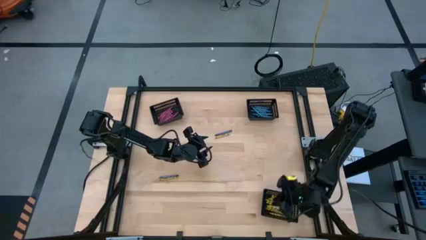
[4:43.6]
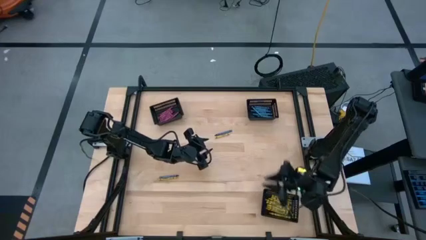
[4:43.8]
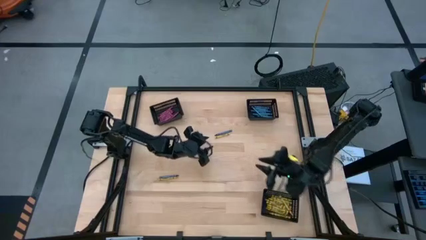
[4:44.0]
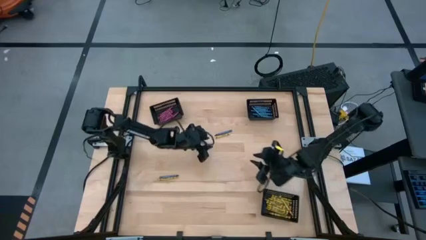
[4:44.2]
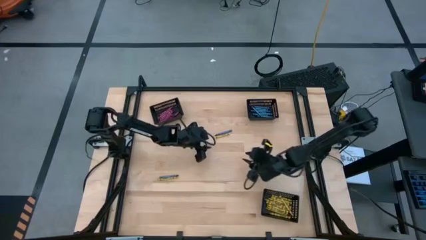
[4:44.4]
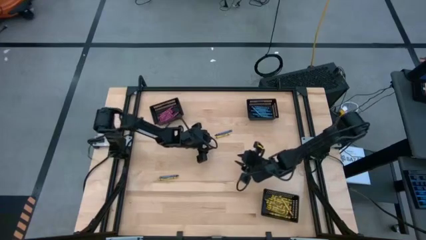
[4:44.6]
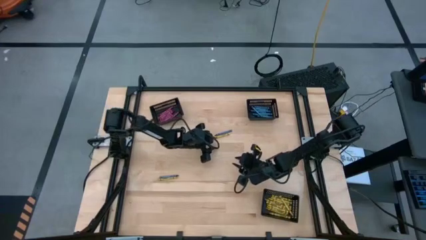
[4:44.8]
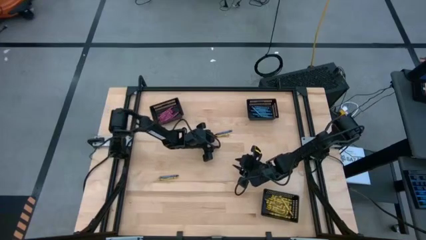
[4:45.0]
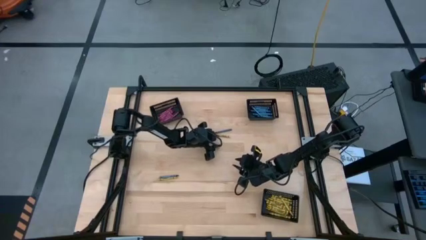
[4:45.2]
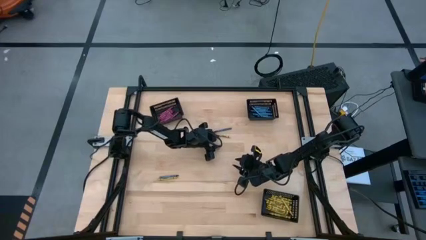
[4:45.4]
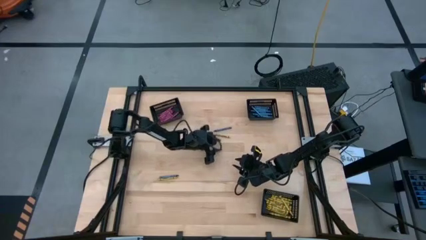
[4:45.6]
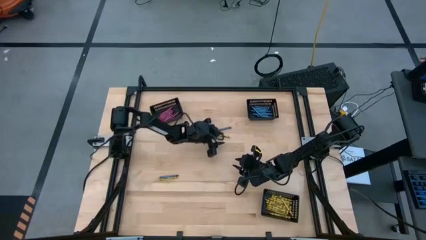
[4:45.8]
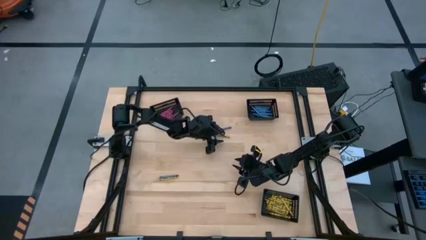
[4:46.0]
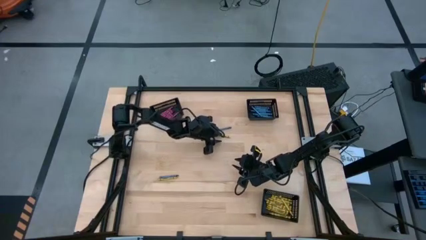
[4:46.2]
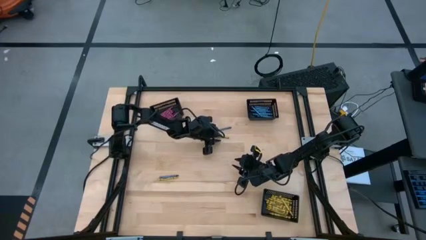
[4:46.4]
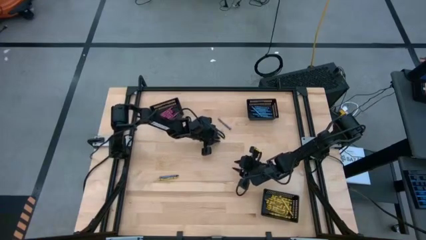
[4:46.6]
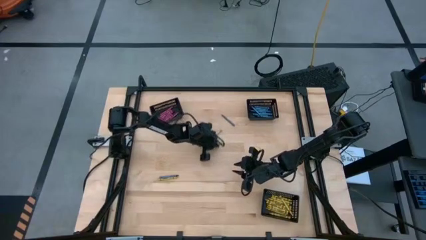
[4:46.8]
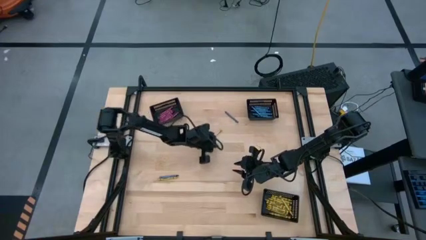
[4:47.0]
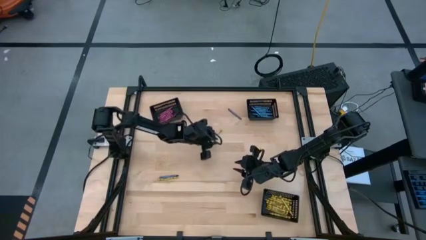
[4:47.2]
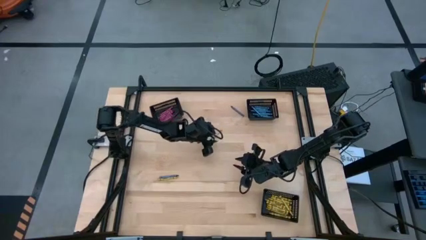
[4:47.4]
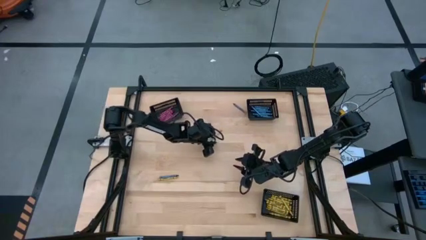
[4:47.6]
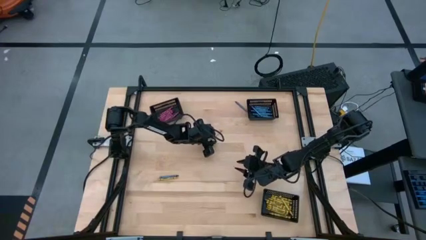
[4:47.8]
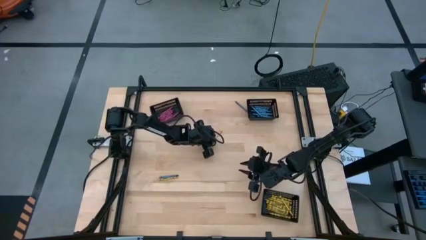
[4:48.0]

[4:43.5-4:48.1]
Task: Sort crayons
Put the yellow crayon into the bottom black bin

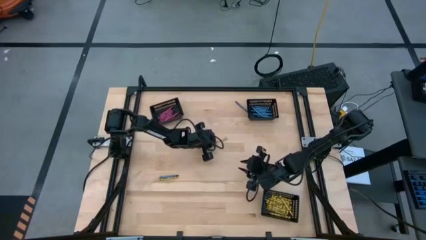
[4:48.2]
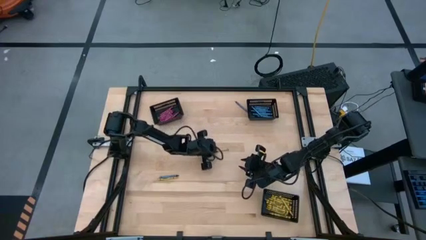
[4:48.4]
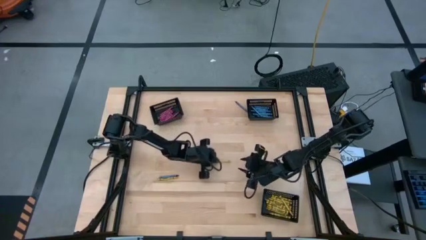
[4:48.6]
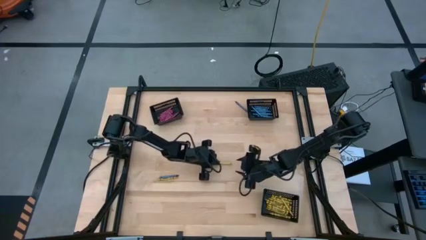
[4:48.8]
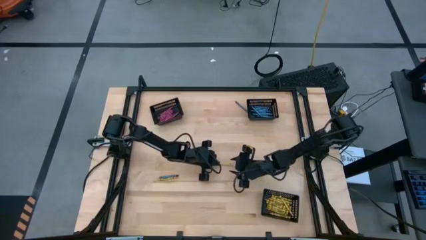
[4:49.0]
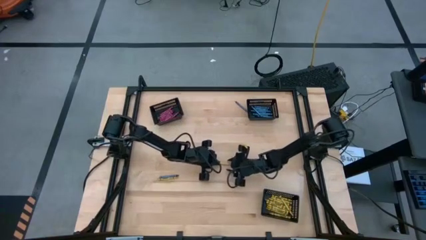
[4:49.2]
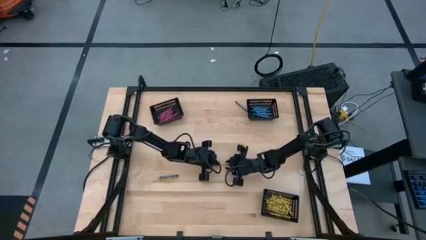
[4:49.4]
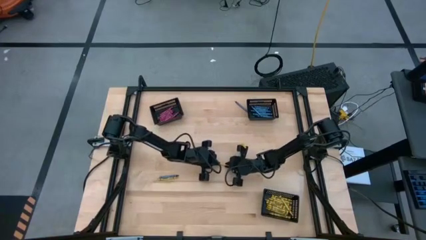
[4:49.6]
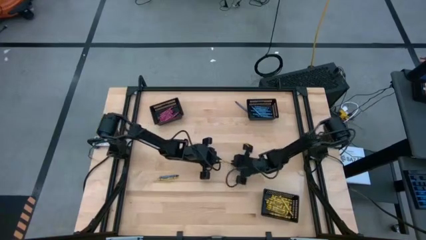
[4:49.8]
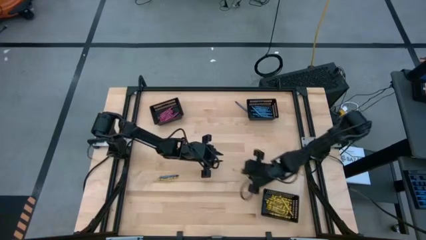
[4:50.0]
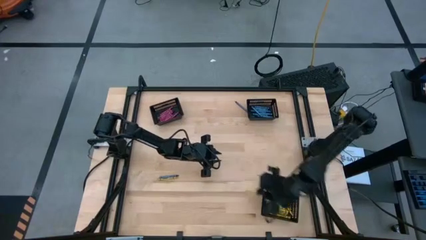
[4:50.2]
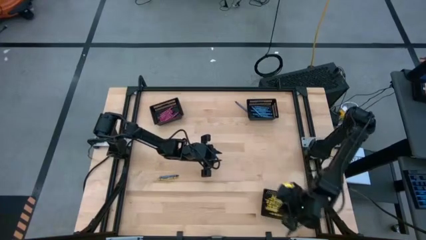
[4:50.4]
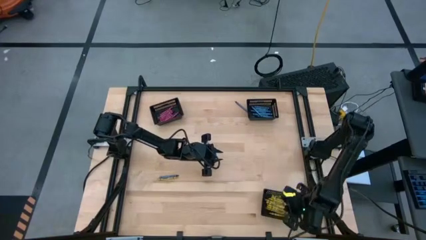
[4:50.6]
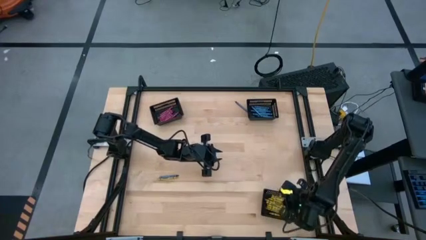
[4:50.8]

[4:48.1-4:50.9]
Put the yellow crayon into the bottom black bin

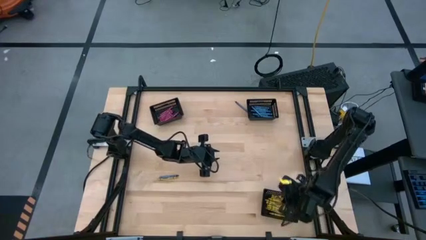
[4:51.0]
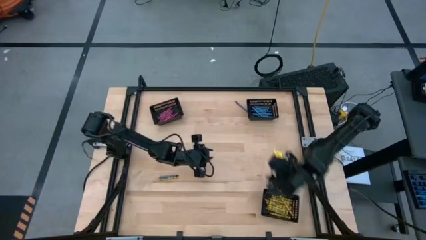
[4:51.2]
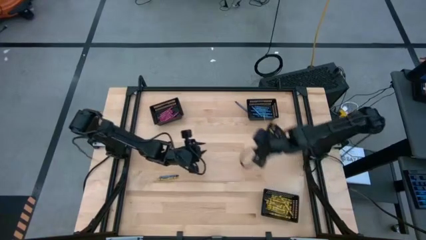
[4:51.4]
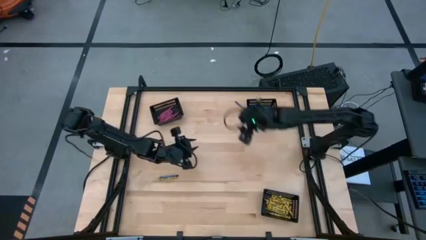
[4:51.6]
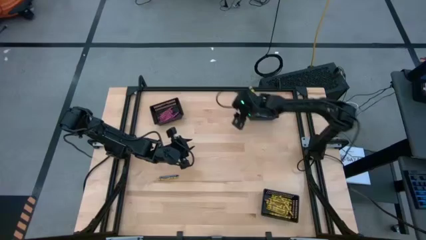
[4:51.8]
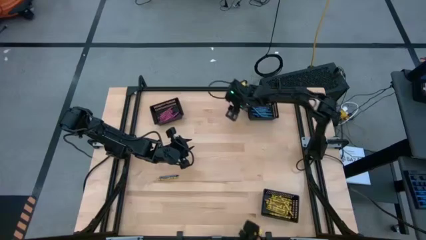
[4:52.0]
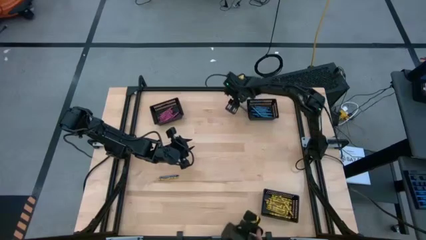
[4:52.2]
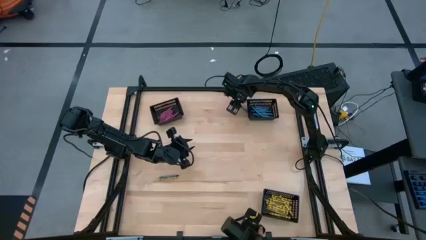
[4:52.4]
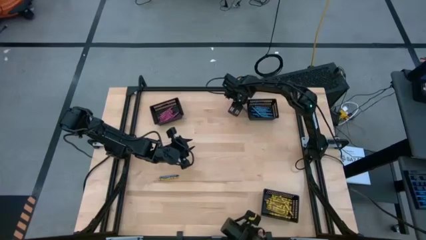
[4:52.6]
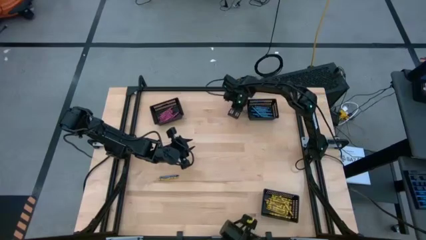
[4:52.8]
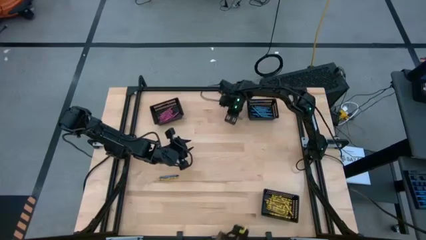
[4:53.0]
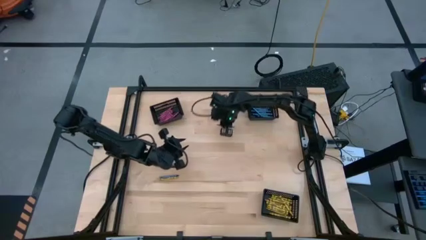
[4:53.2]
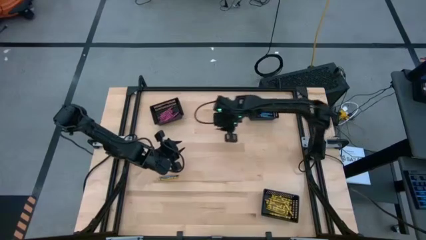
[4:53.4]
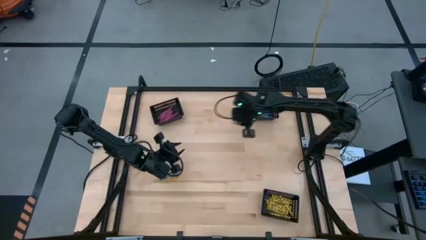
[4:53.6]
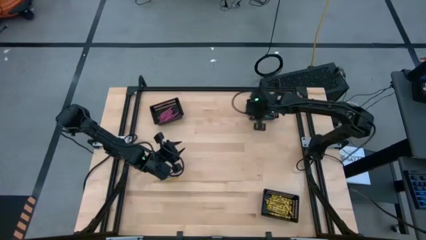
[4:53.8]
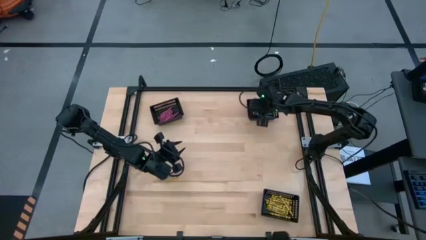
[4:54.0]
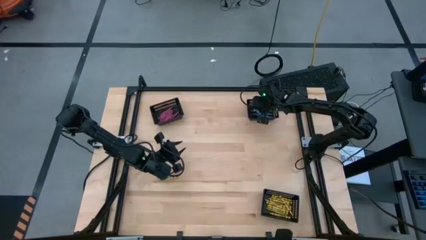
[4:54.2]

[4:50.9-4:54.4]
Put the blue crayon into the top right black bin

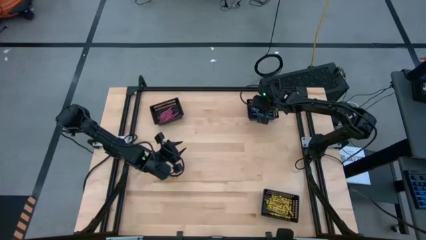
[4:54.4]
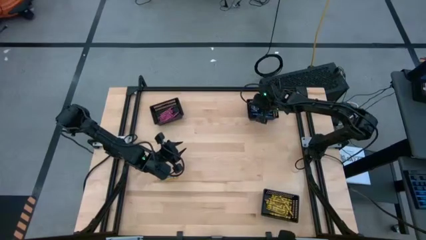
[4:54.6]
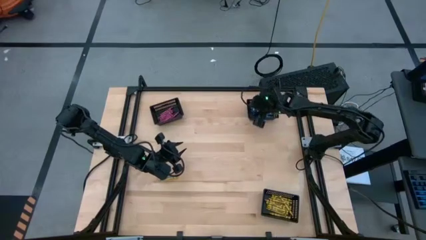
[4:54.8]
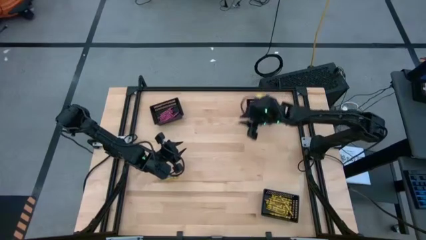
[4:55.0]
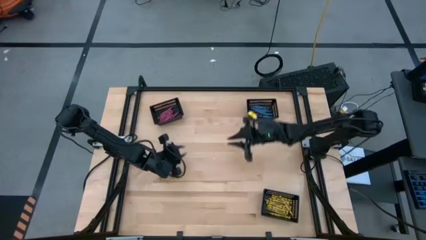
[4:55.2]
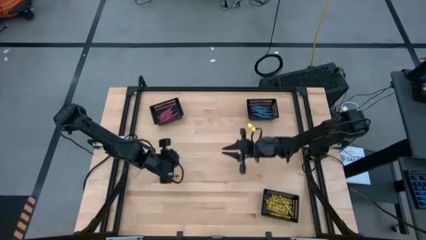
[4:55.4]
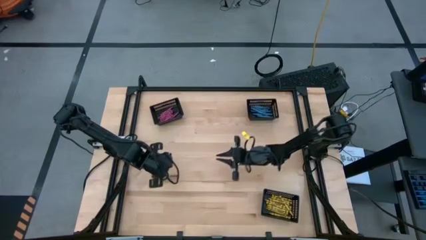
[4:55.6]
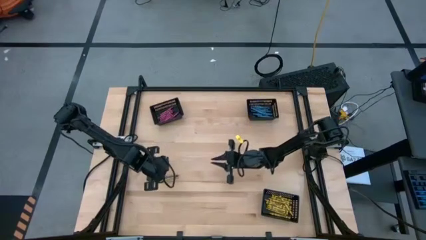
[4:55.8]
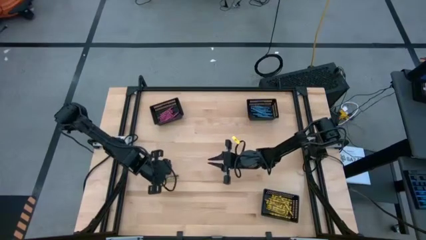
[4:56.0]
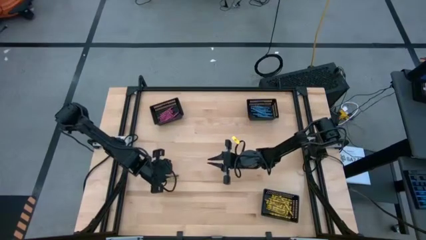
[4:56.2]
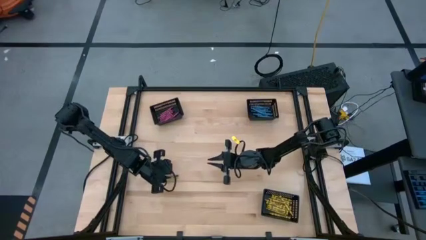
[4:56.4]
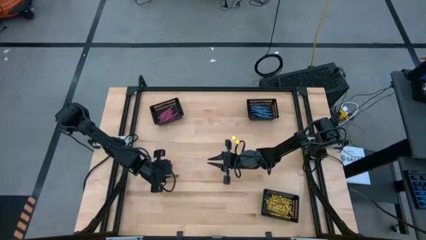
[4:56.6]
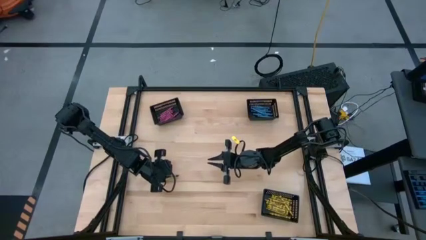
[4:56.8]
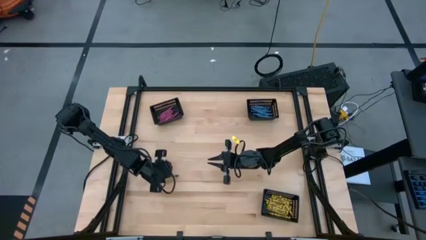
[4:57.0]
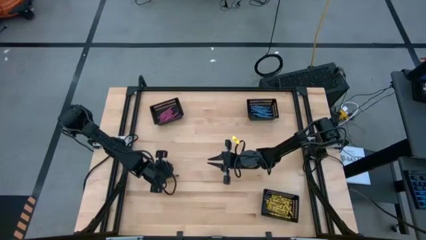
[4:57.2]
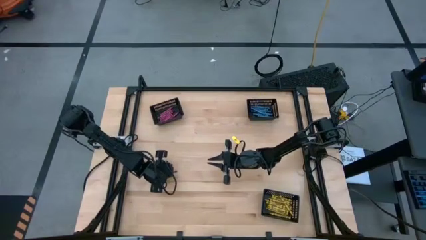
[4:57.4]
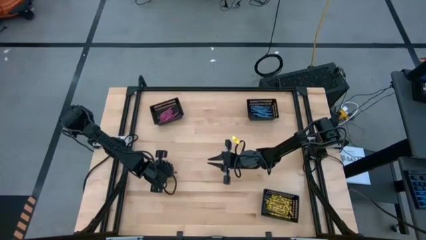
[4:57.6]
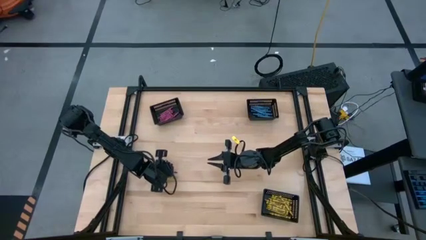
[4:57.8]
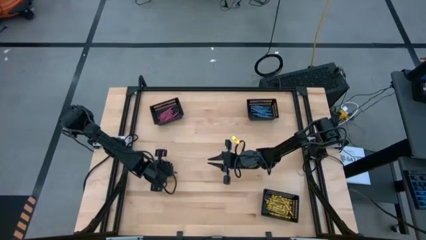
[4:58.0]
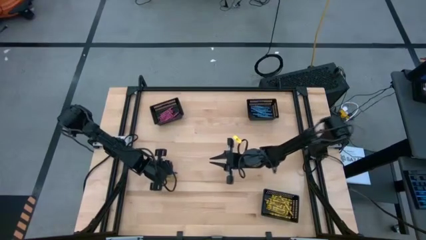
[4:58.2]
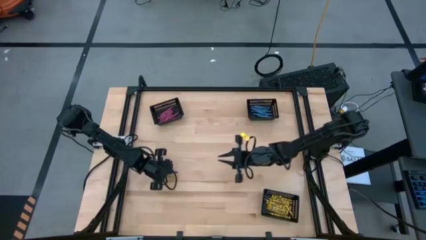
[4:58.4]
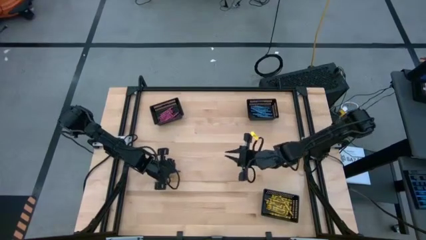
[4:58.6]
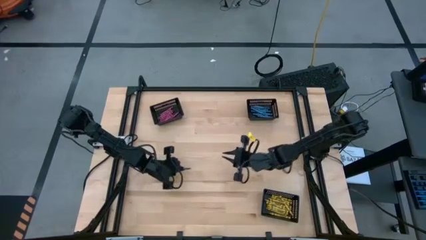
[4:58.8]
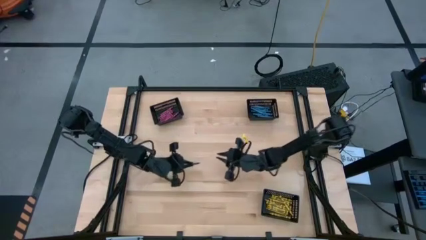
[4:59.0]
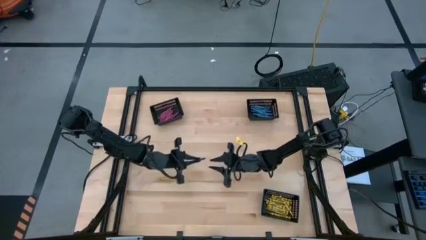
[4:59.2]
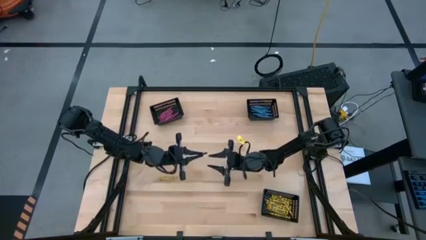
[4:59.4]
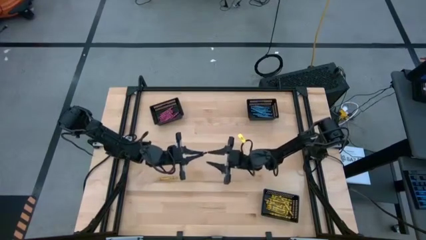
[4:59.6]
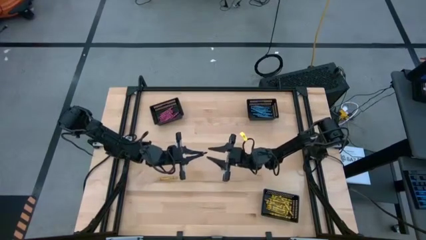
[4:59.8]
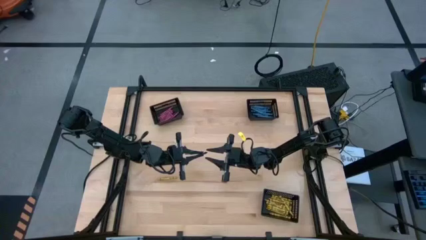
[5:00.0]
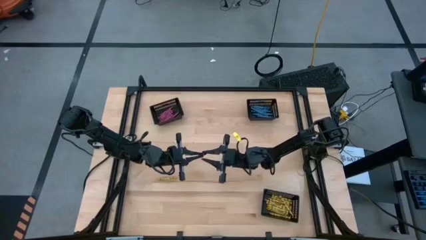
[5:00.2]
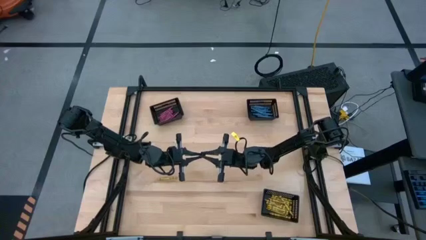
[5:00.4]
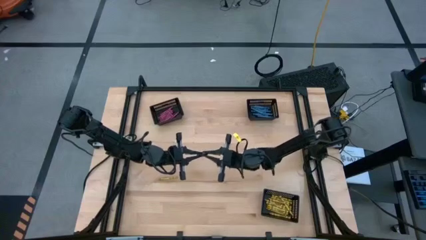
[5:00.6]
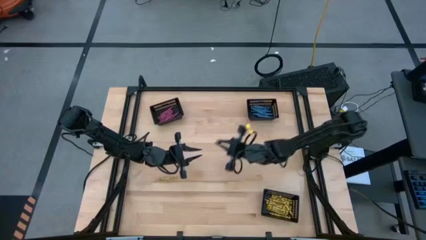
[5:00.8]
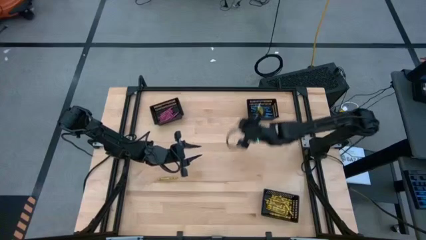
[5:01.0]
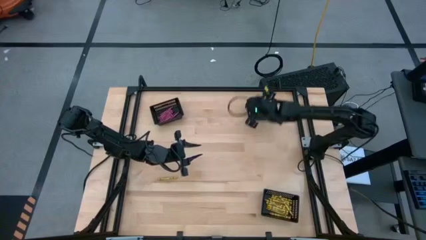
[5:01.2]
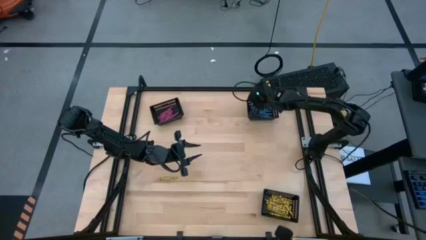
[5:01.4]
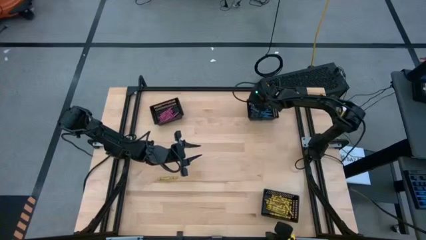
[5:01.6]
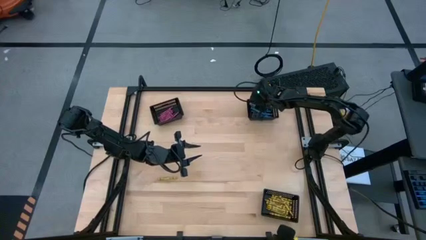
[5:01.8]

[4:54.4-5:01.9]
Put the blue crayon into the top right black bin
